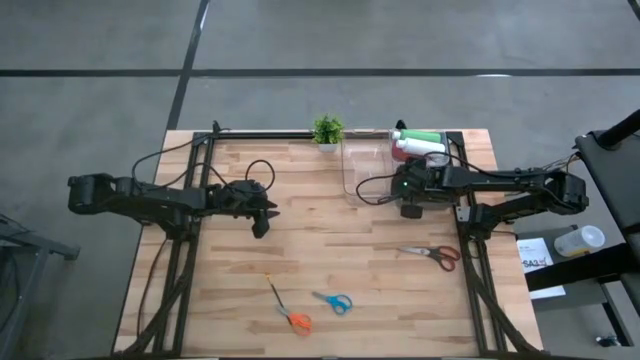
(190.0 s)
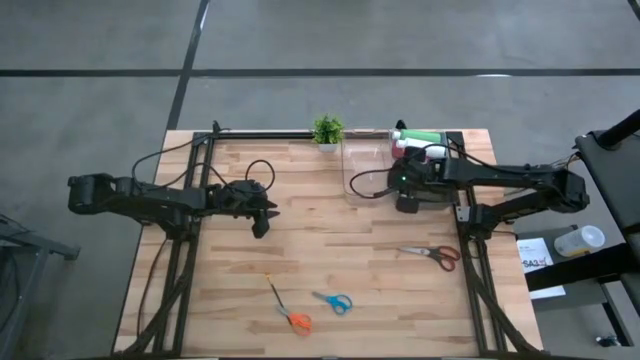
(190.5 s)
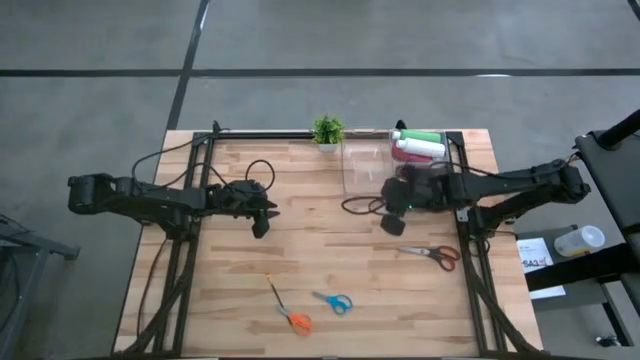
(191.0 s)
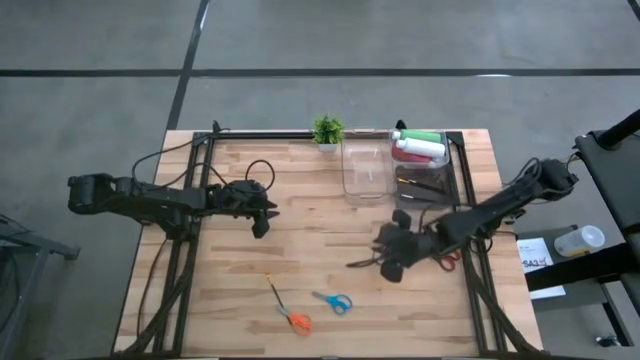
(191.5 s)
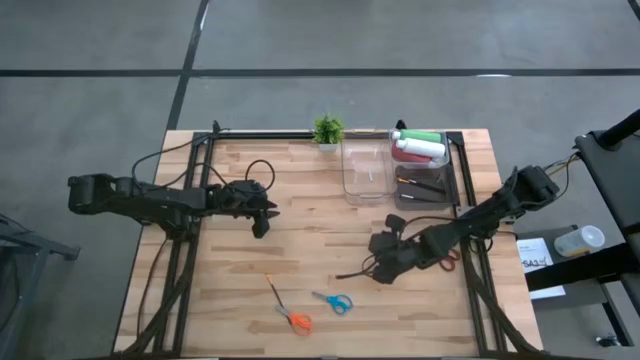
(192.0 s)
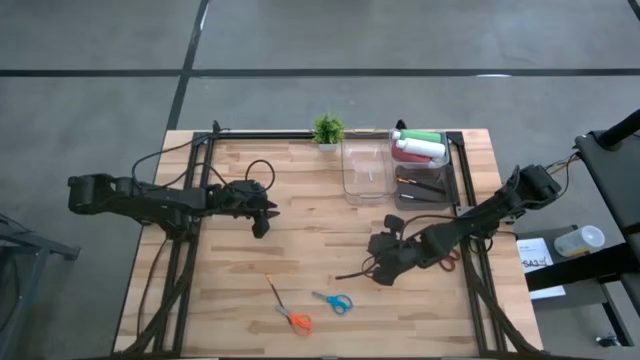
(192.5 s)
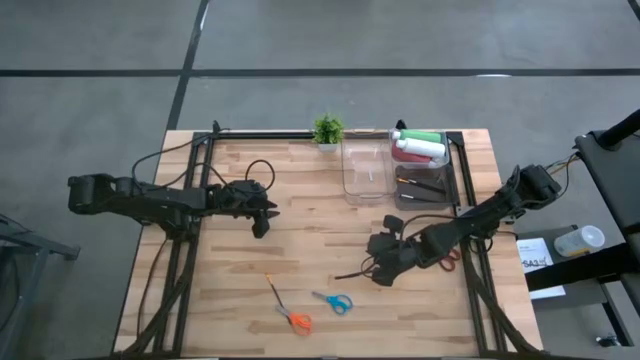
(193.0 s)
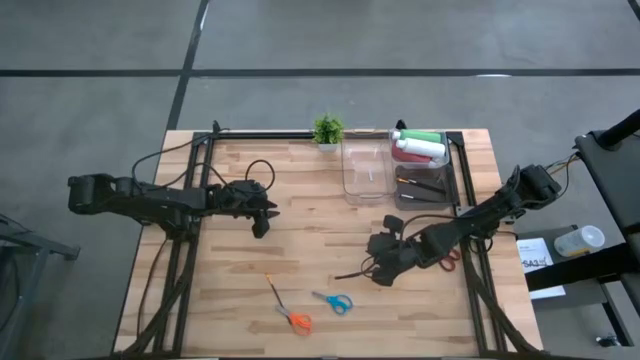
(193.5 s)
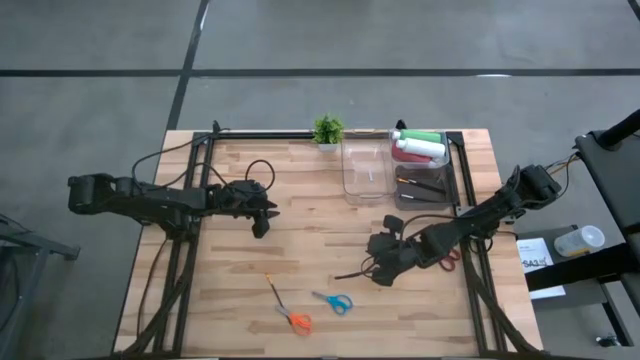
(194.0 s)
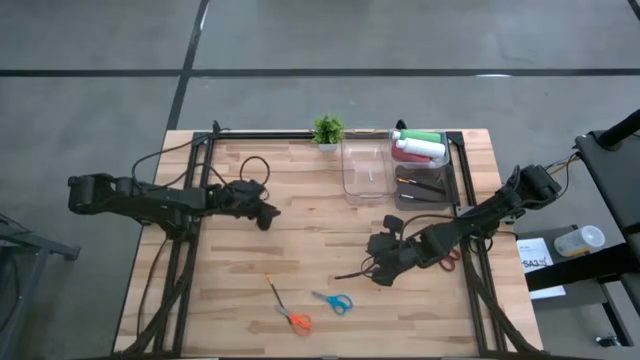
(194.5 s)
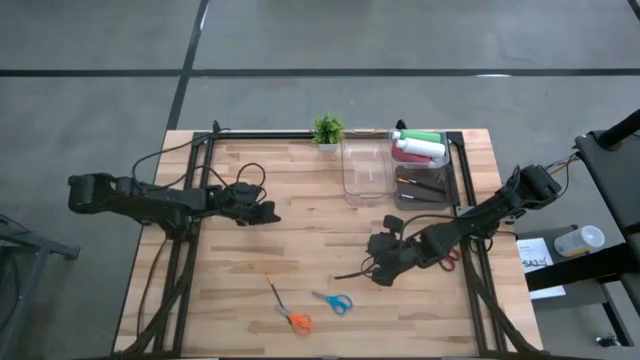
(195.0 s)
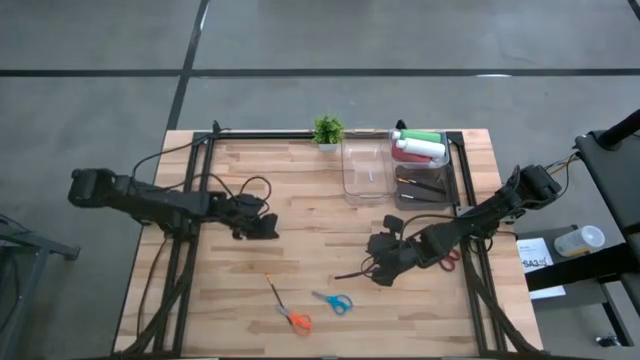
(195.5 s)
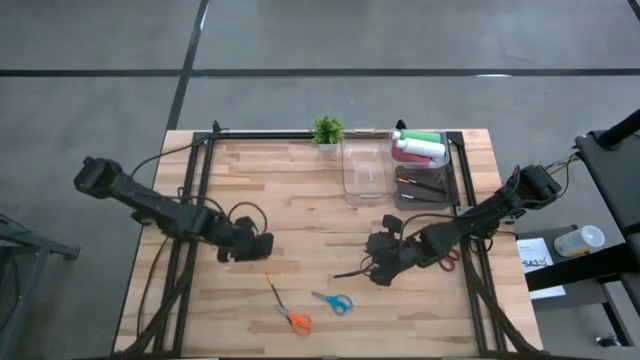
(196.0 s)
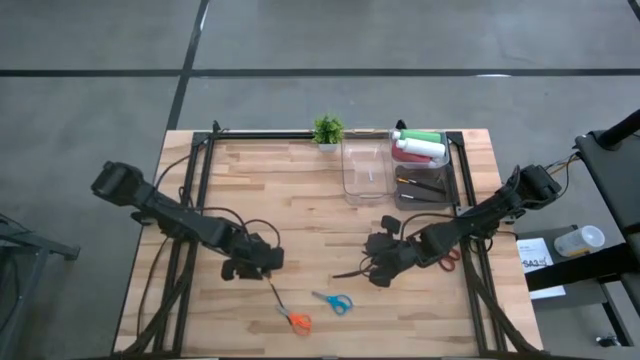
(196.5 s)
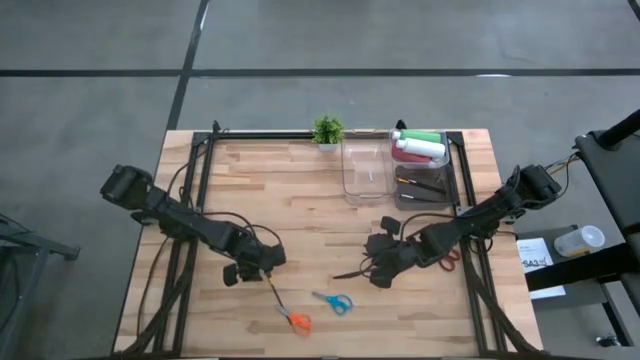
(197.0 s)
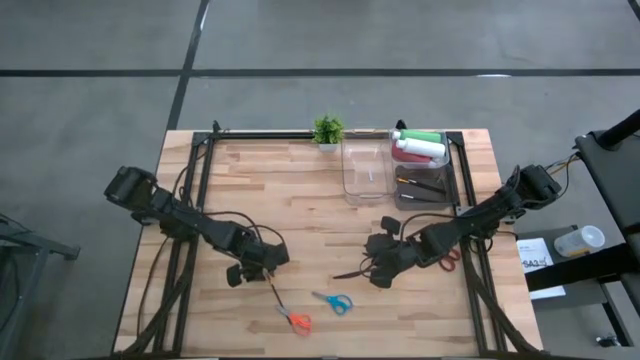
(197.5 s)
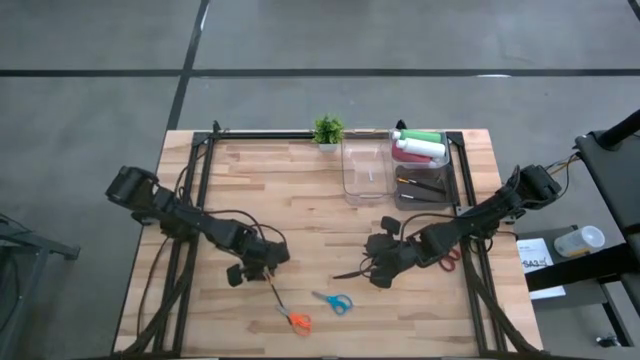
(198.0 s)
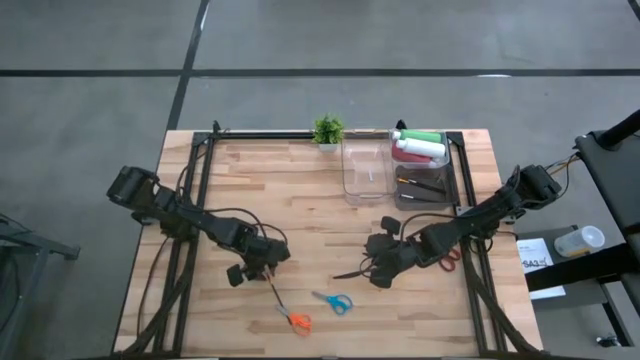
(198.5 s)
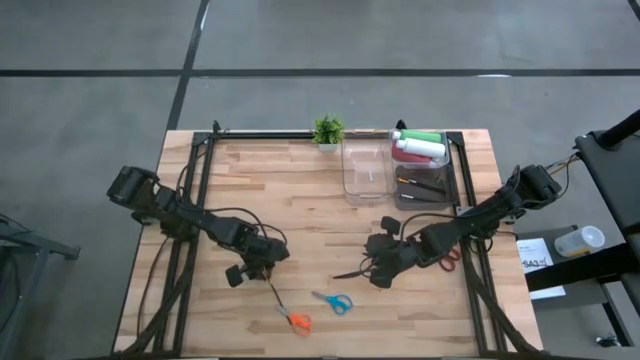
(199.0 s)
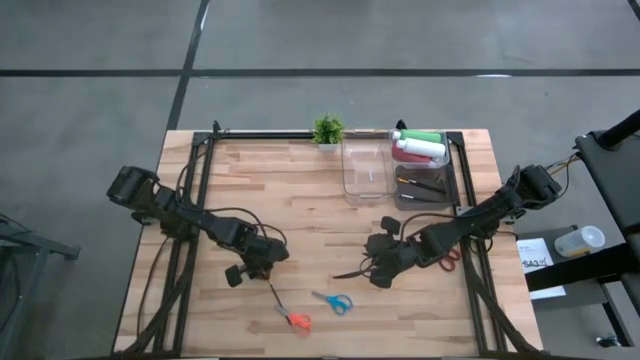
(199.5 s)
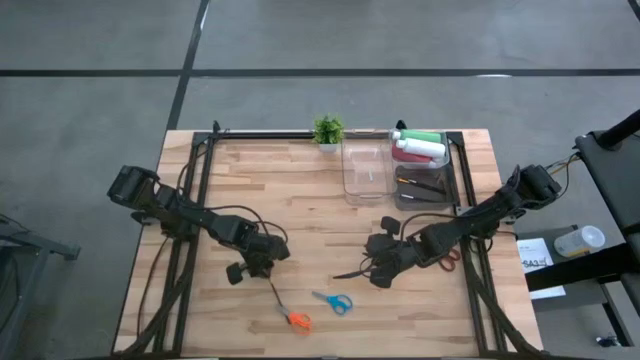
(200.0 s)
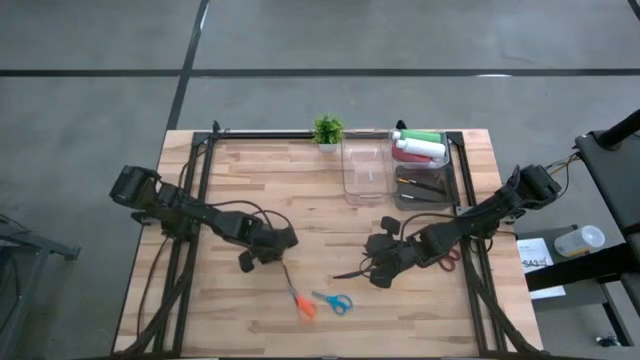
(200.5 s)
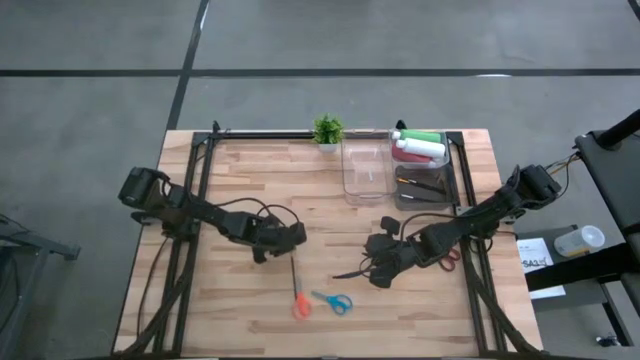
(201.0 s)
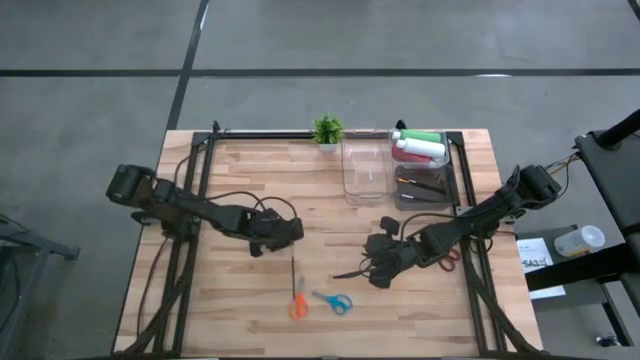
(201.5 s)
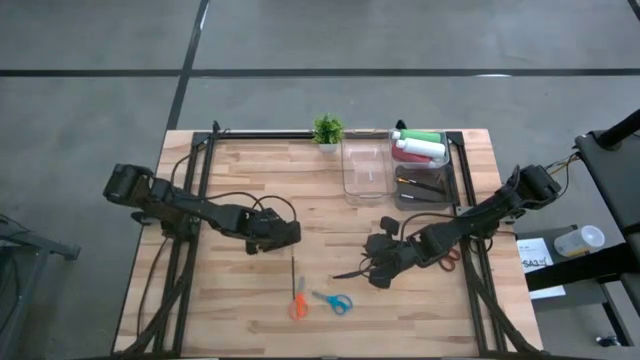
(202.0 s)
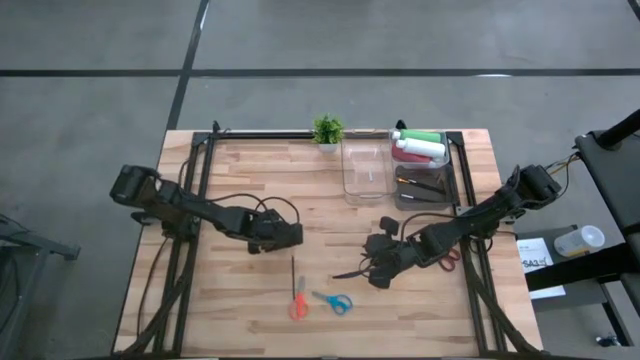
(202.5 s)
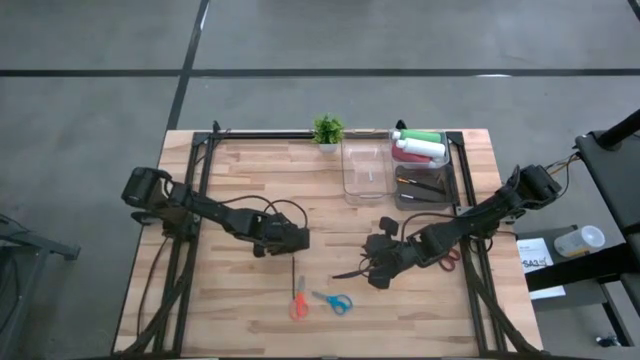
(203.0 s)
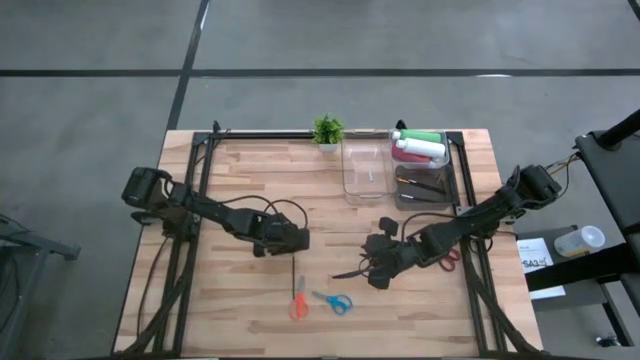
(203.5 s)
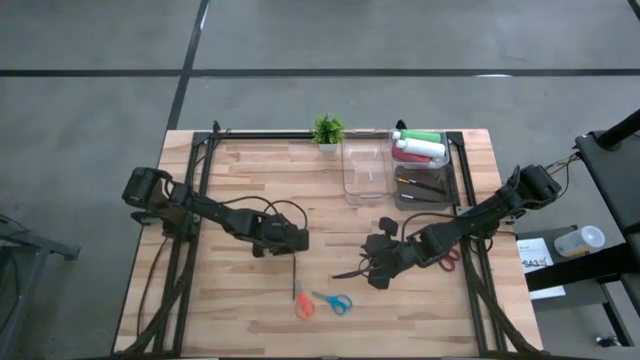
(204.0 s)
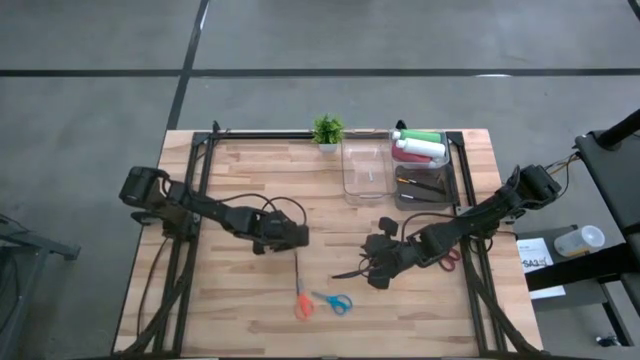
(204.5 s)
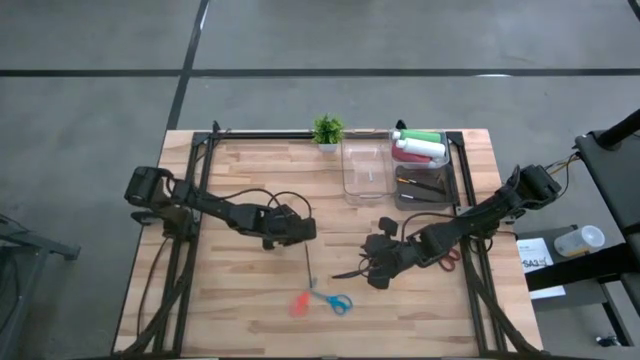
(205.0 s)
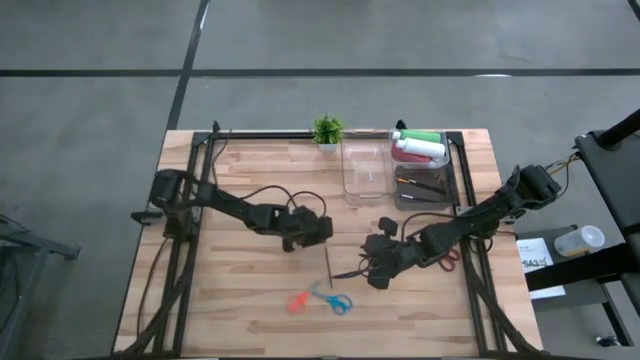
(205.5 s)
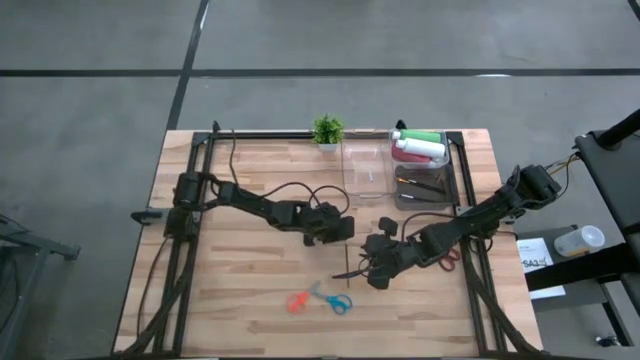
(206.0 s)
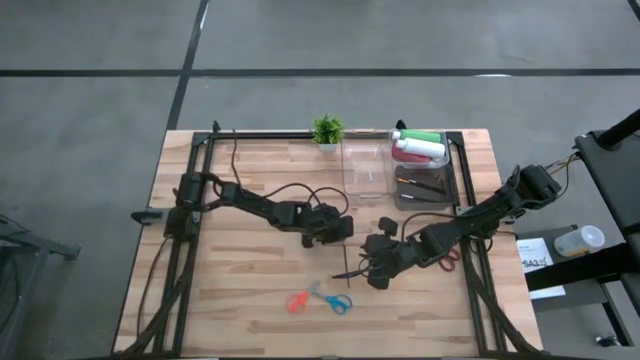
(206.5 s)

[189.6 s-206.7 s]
Task: Pick & Place Paint Supplies
Put the gold paintbrush into the black bin

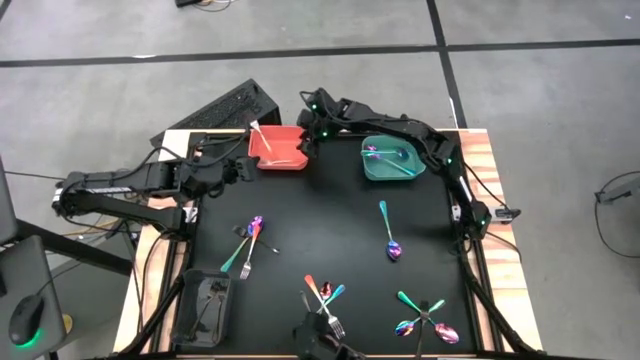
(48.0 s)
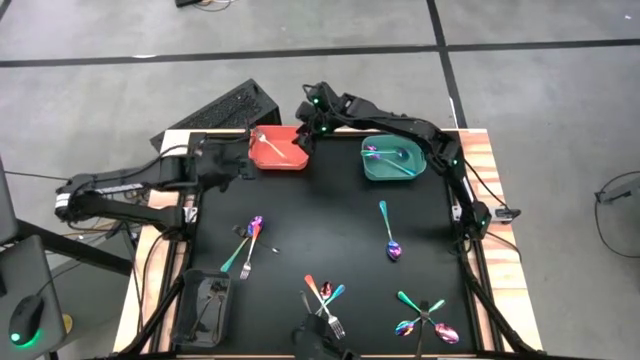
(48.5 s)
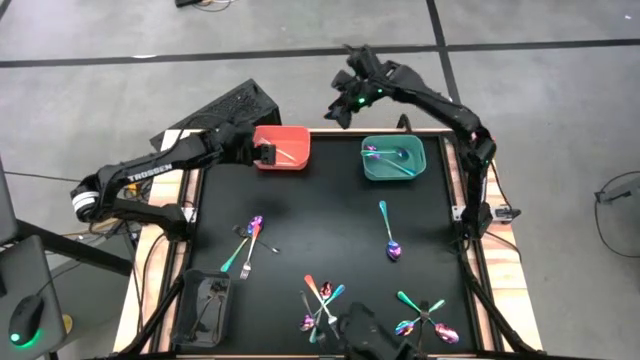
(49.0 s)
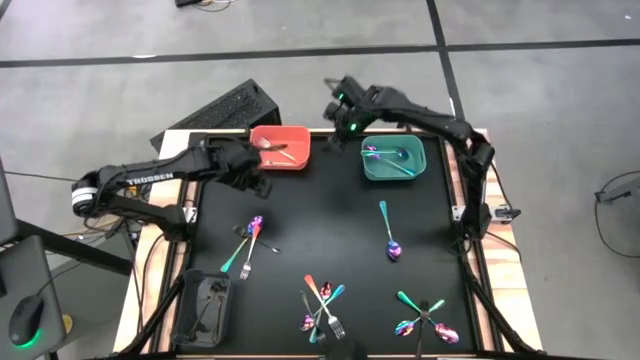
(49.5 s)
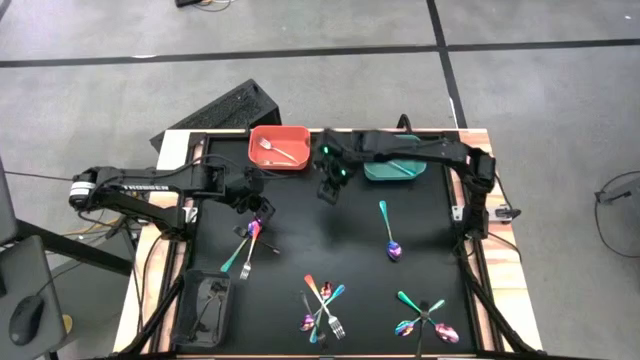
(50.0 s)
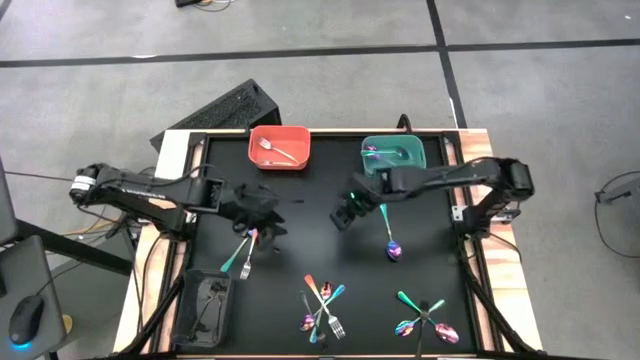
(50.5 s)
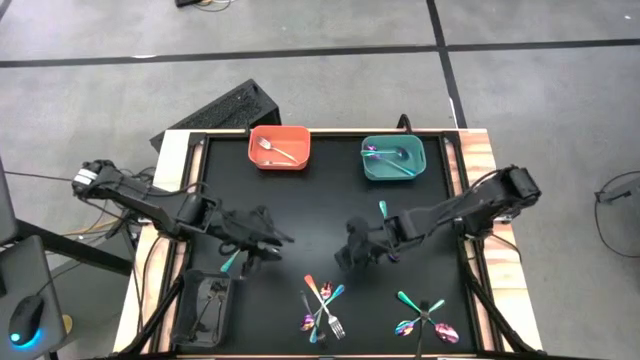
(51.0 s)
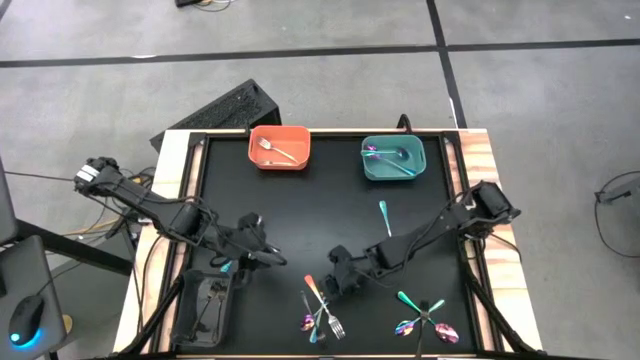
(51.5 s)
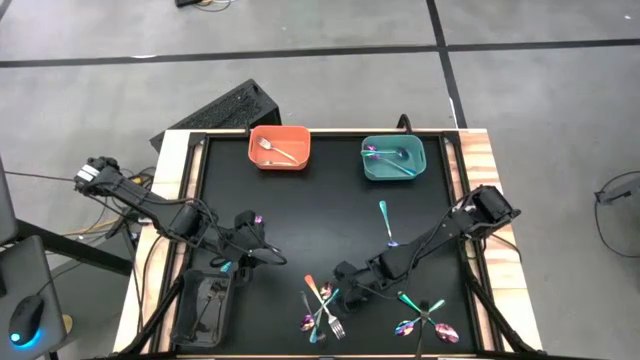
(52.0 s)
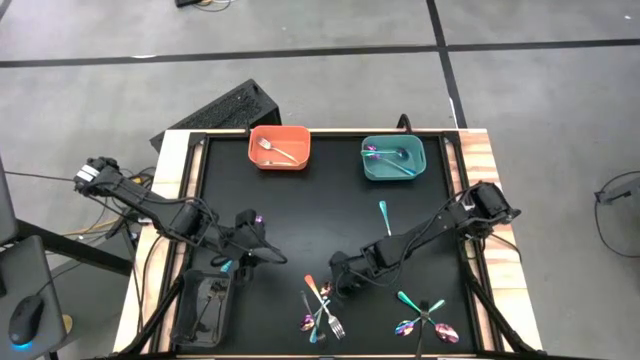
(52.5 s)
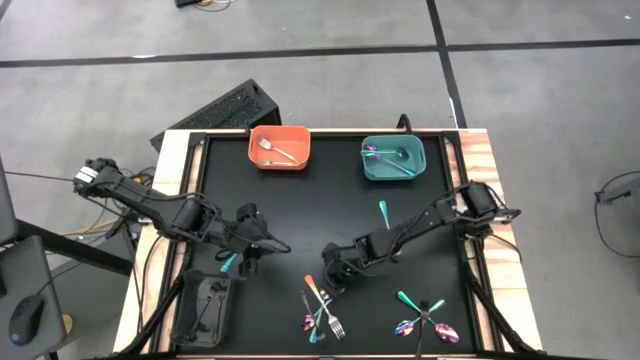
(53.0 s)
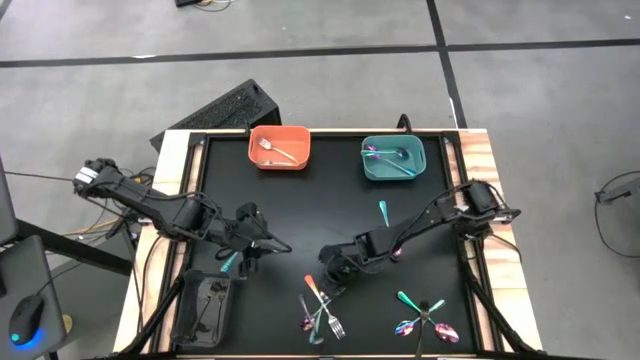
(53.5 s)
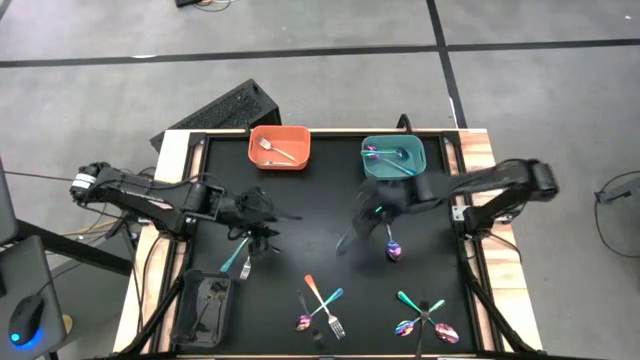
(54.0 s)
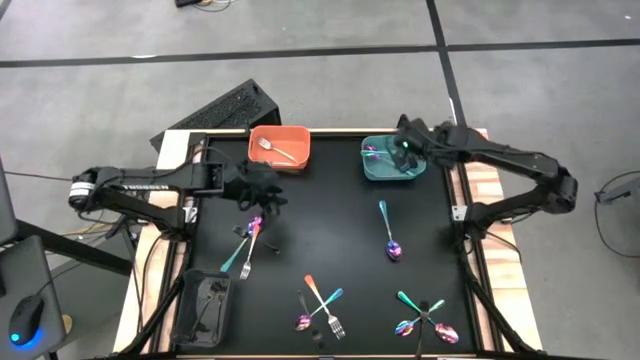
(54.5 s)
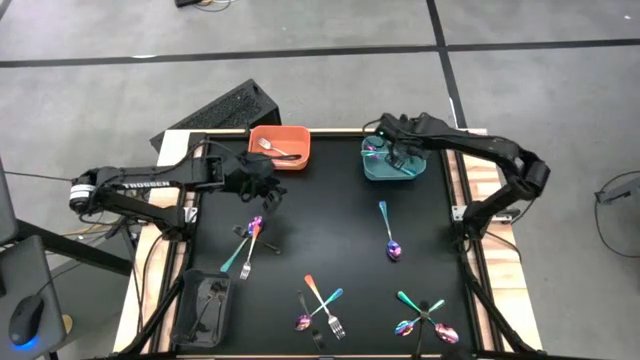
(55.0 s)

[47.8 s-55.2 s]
Task: Sort silverware by color (type)
Put the blue spoon into the blue bin
